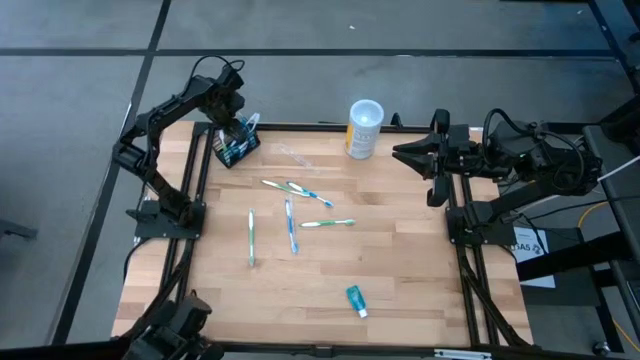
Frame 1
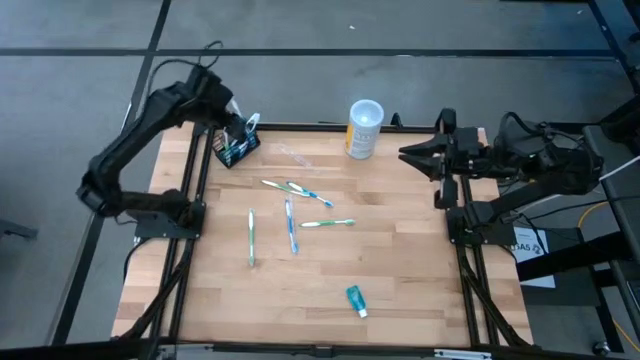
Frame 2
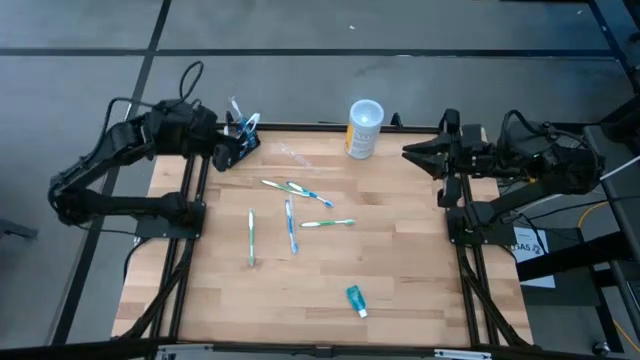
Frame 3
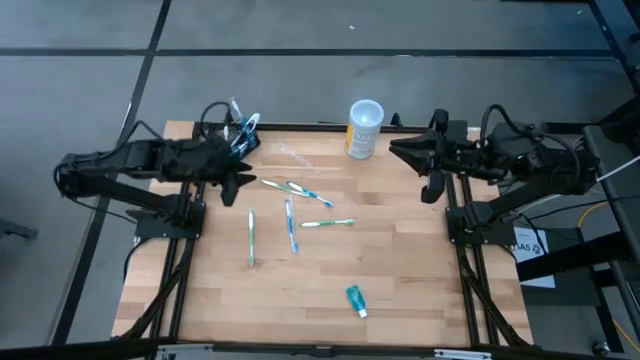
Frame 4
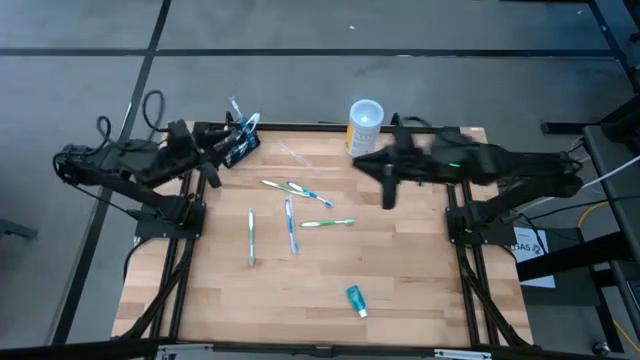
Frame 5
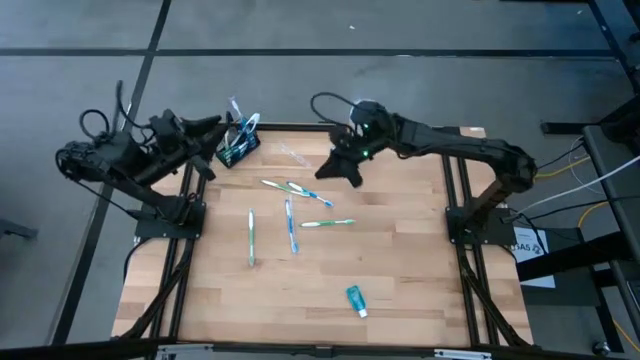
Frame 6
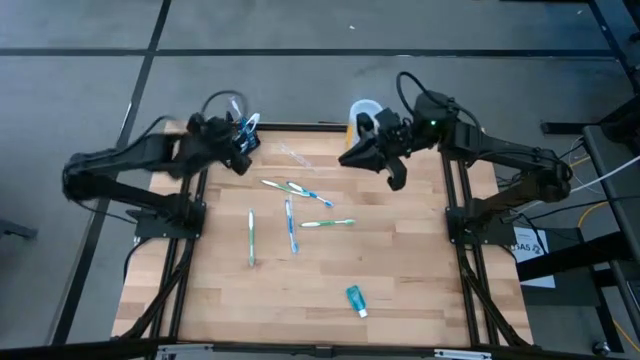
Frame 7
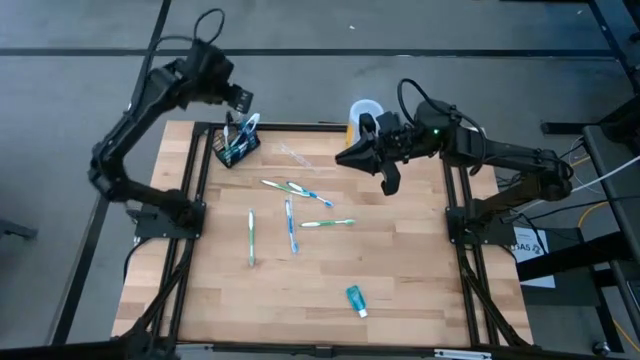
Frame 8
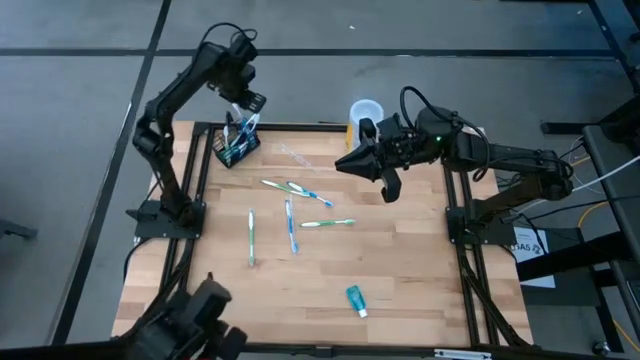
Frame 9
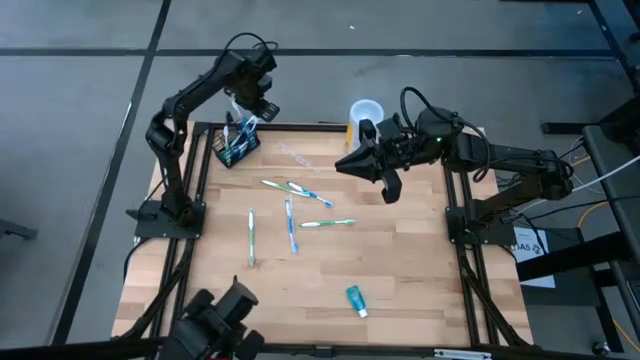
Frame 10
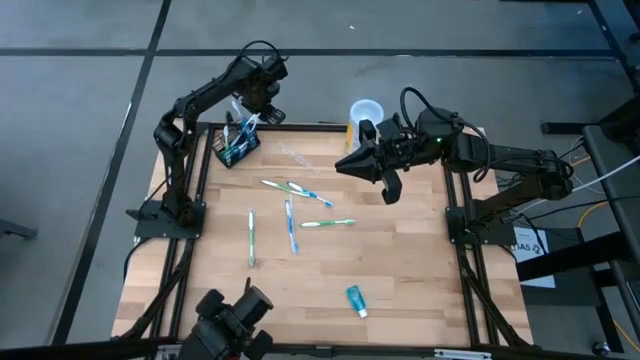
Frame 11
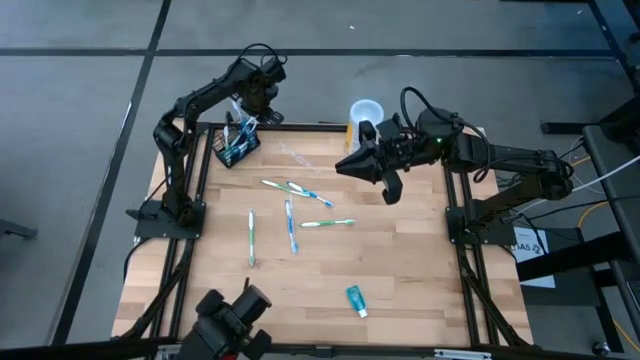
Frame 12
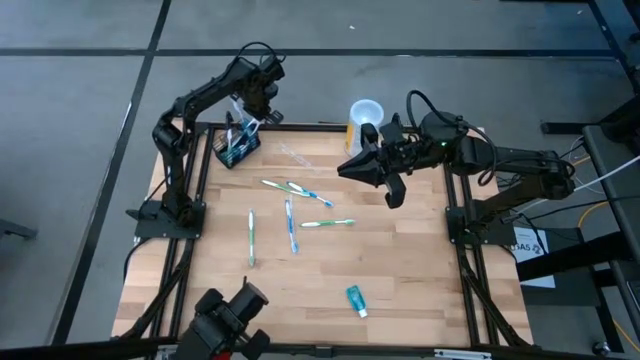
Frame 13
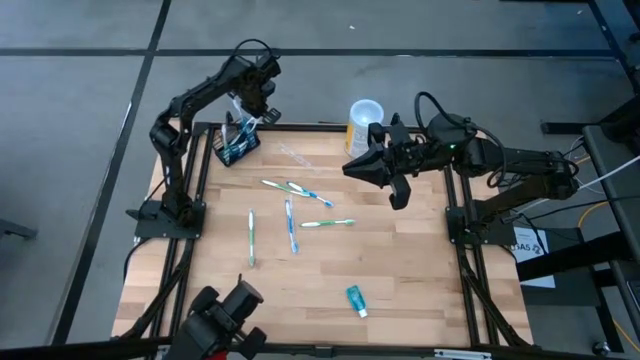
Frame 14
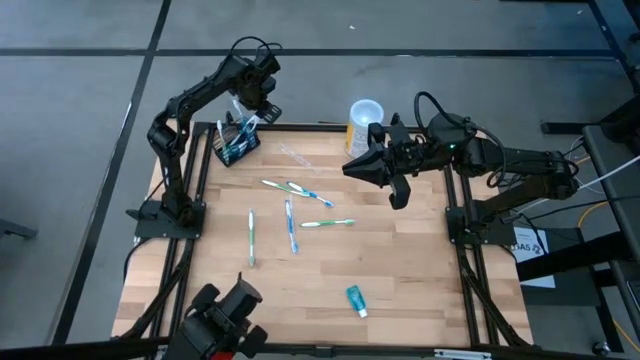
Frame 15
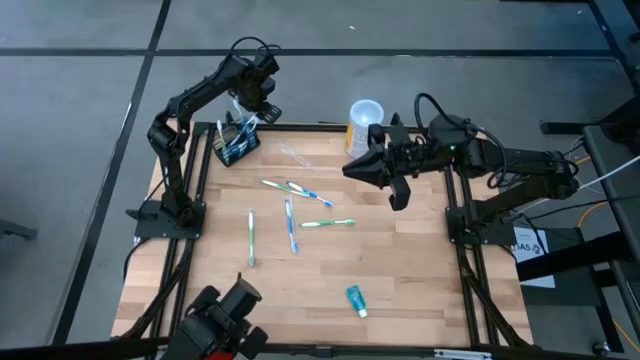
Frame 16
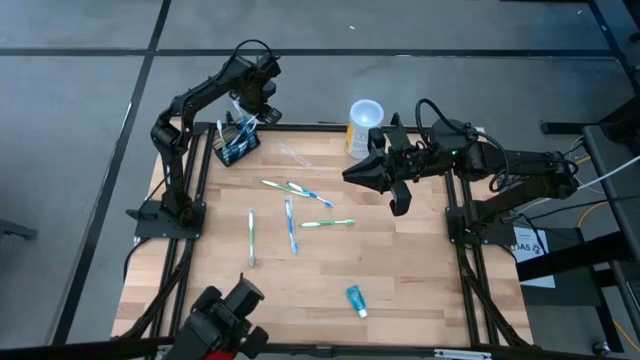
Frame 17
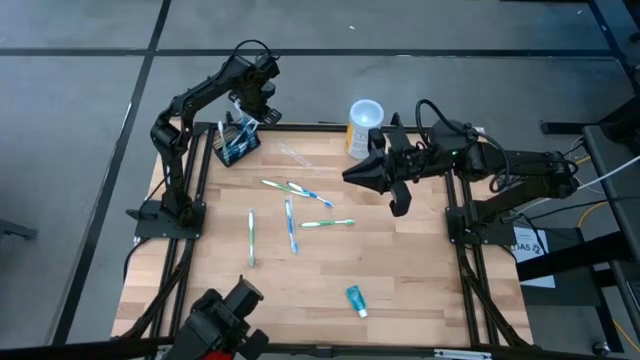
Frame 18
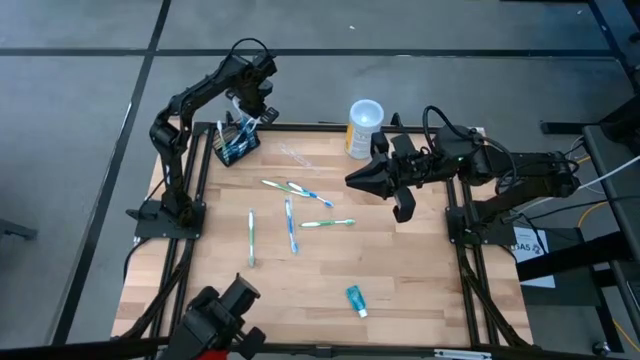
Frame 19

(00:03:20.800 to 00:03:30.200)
Task: Pick & Place toothbrushing station
Adjust the blue toothbrushes in the black wire organizer

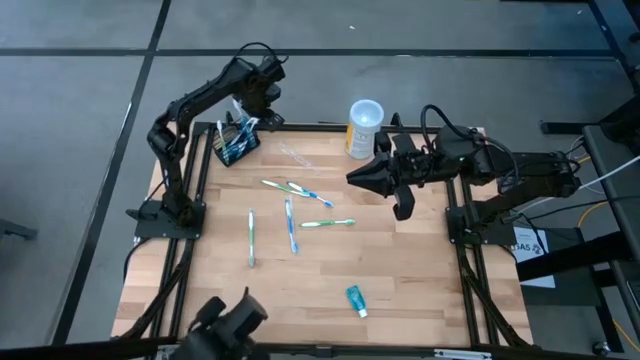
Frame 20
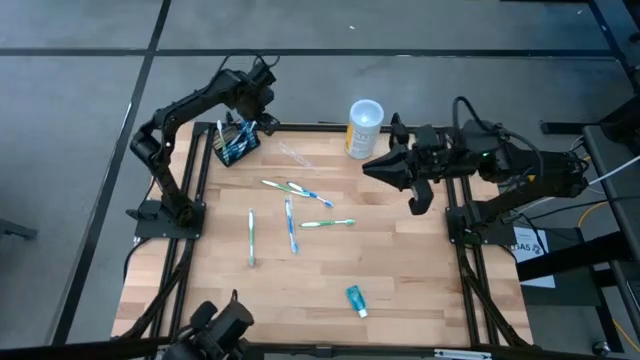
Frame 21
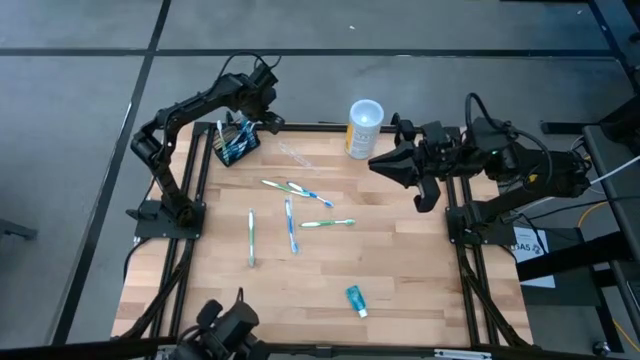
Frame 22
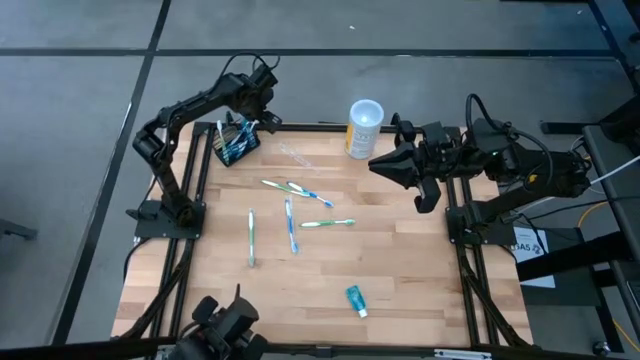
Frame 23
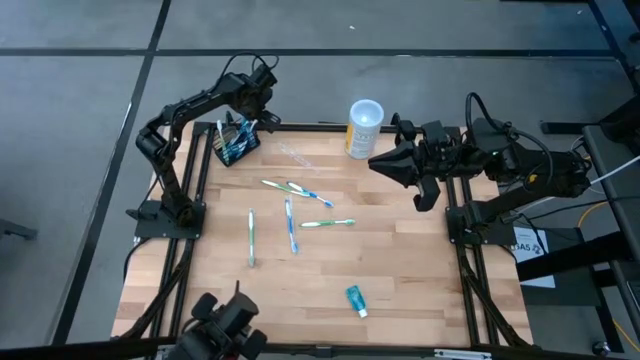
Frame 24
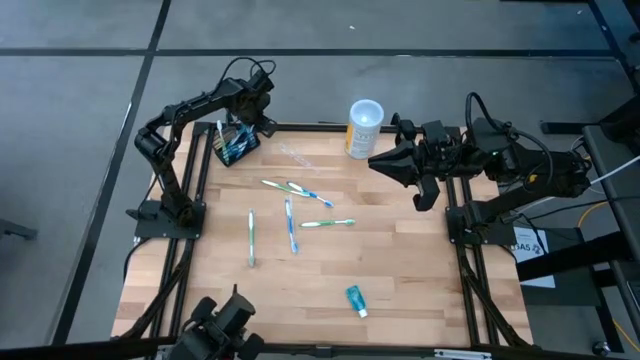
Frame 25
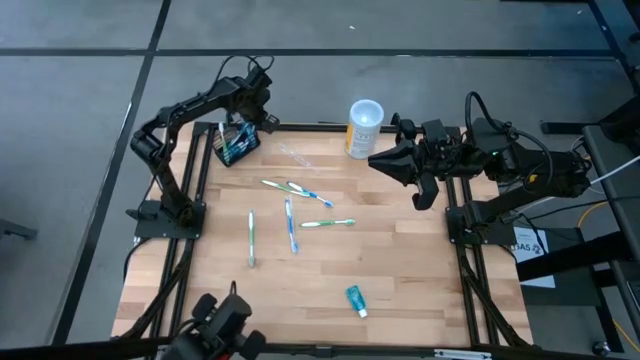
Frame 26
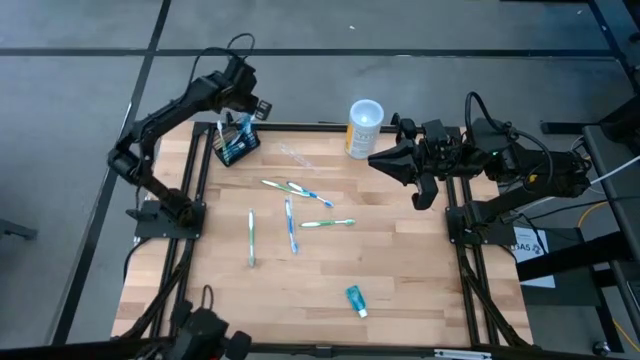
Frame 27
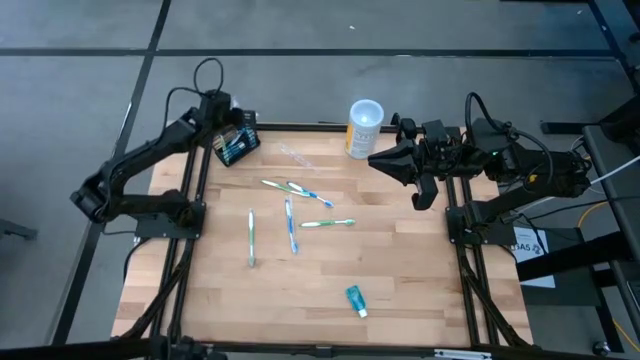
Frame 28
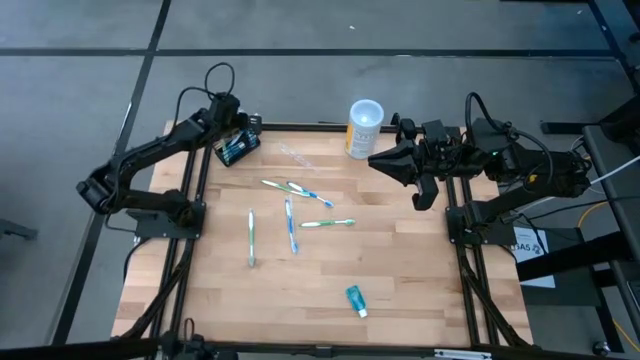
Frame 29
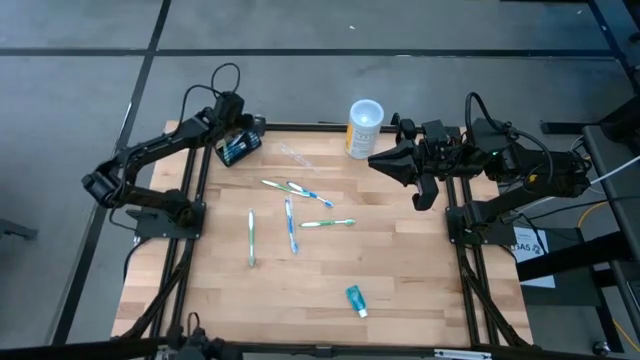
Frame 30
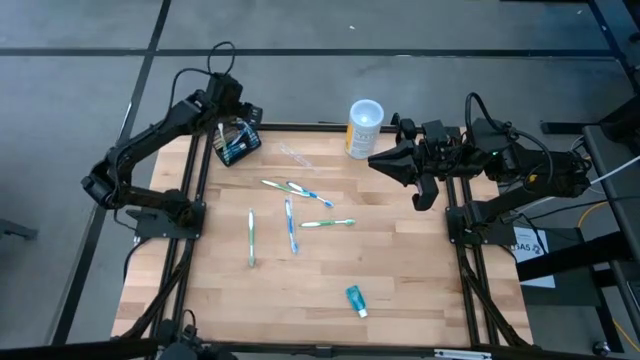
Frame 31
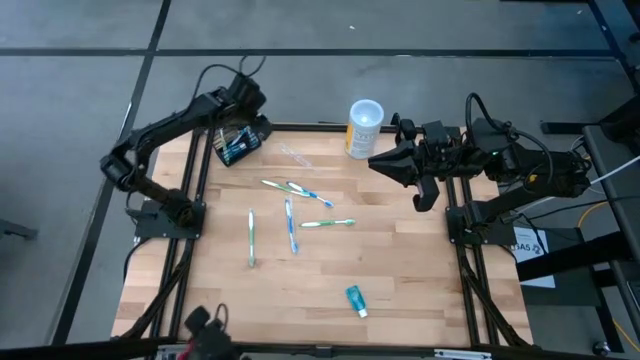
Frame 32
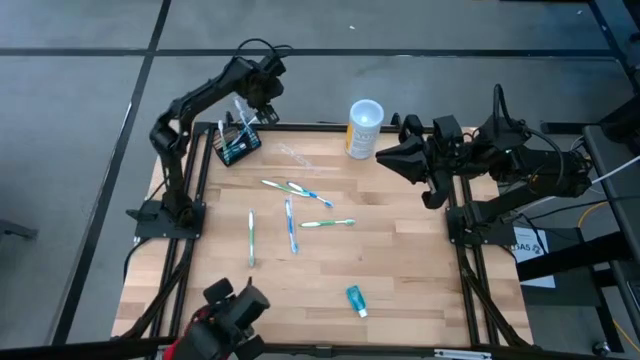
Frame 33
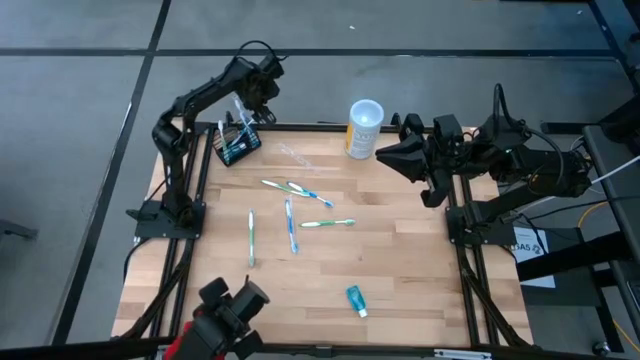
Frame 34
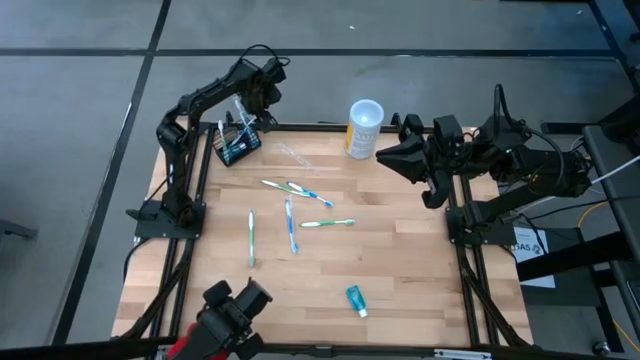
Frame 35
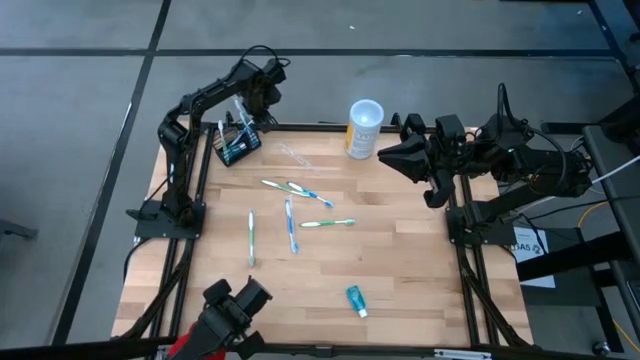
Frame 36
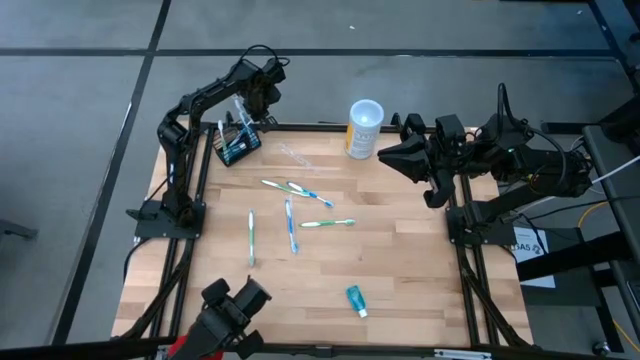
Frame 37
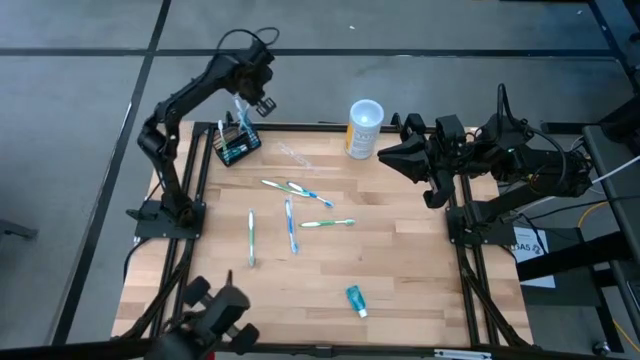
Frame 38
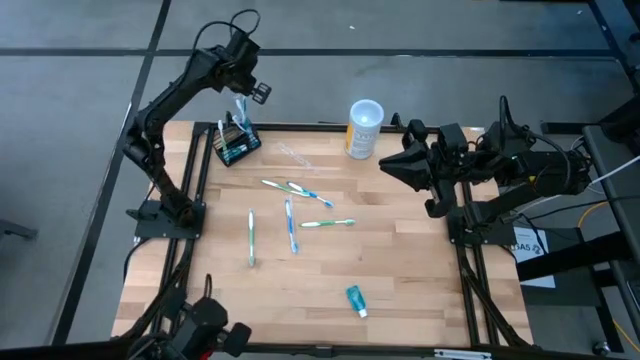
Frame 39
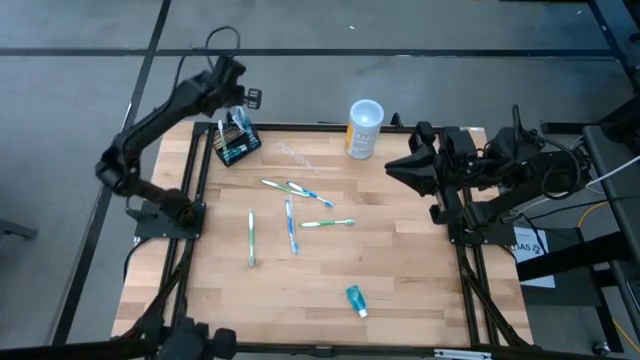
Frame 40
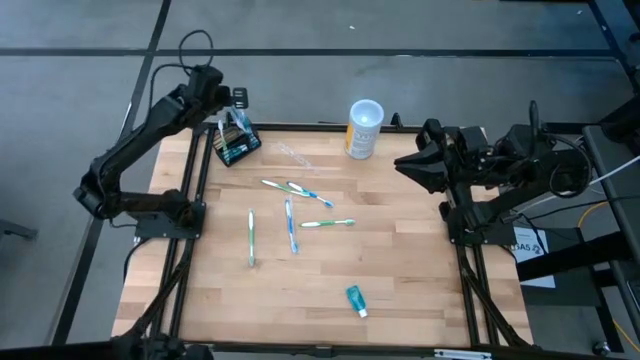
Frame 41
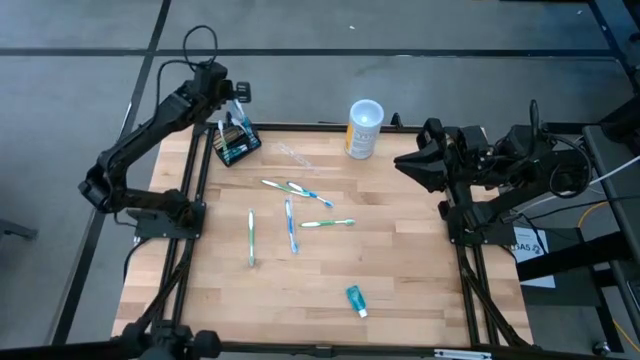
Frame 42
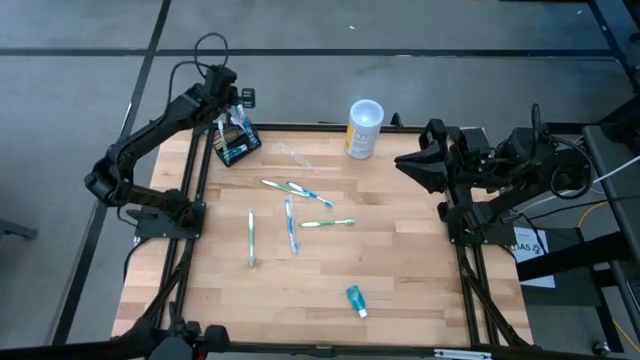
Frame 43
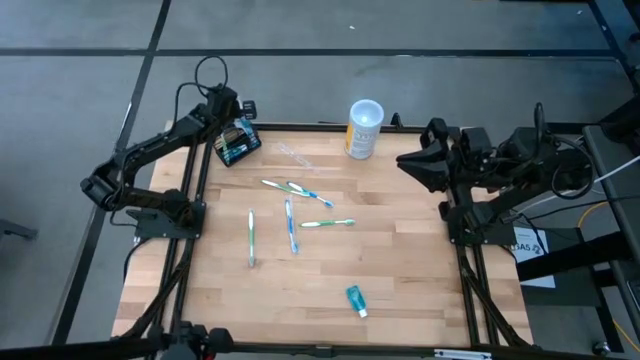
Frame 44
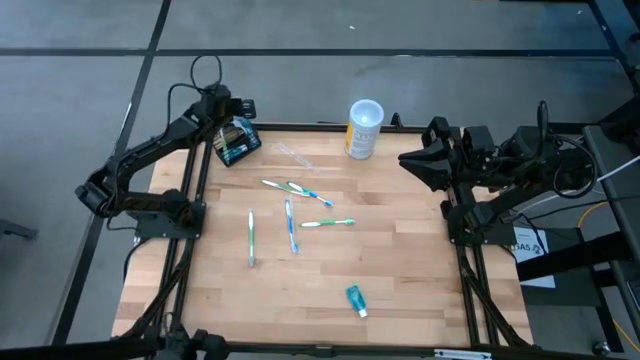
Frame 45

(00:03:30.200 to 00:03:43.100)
Adjust the blue toothbrushes in the black wire organizer
